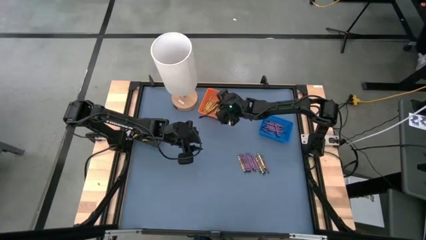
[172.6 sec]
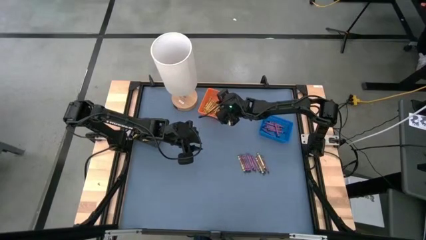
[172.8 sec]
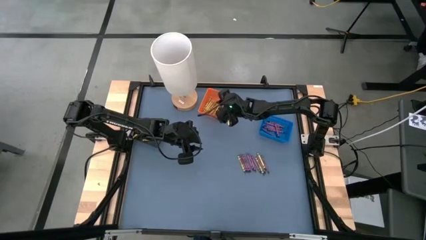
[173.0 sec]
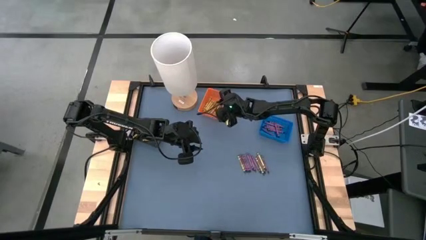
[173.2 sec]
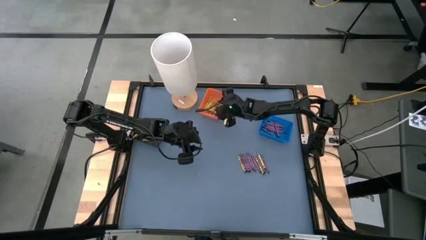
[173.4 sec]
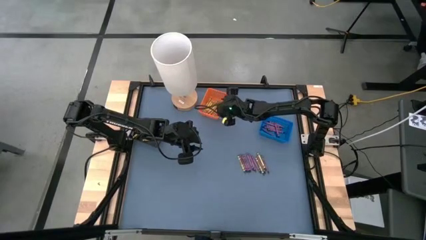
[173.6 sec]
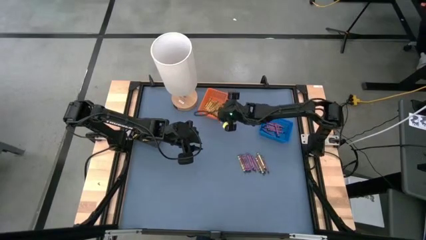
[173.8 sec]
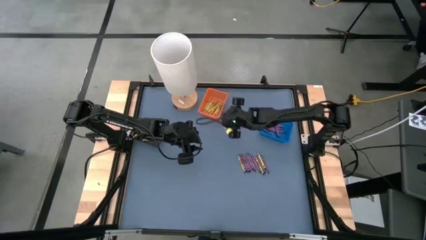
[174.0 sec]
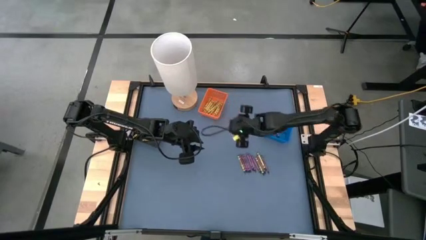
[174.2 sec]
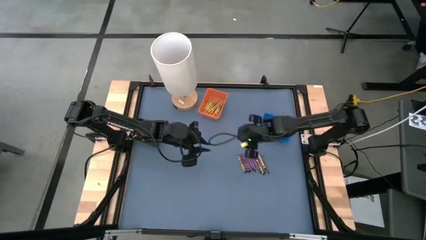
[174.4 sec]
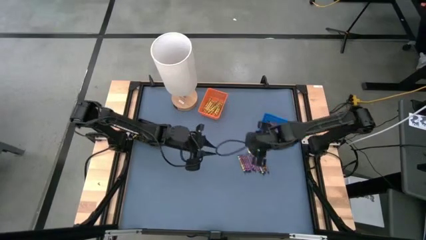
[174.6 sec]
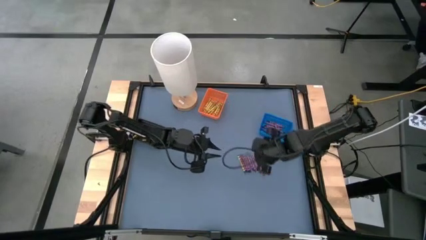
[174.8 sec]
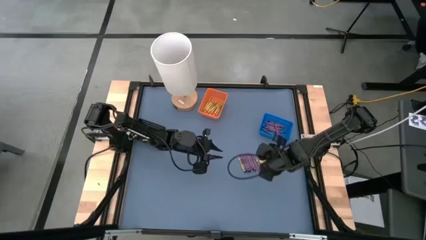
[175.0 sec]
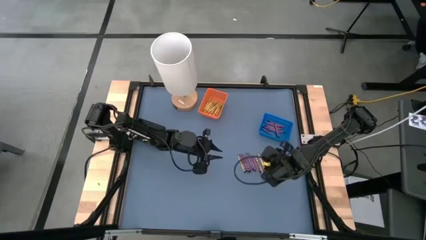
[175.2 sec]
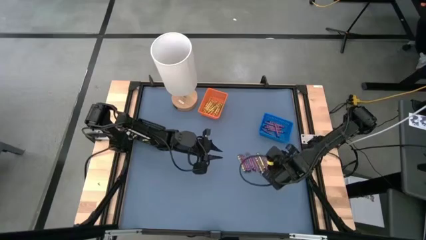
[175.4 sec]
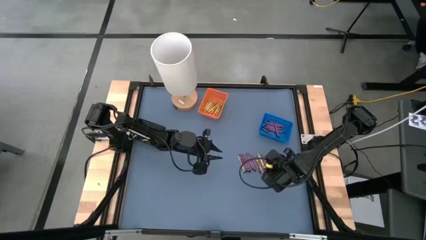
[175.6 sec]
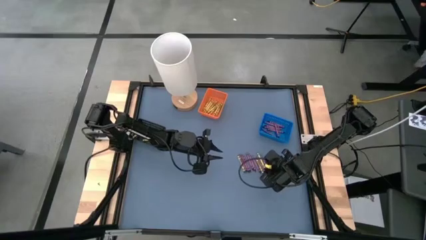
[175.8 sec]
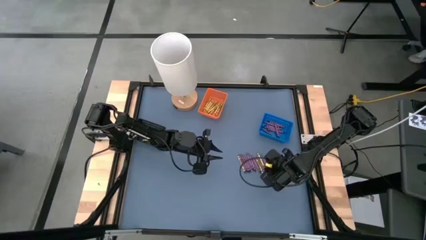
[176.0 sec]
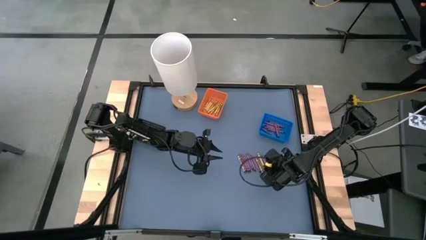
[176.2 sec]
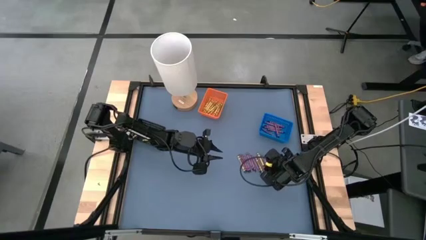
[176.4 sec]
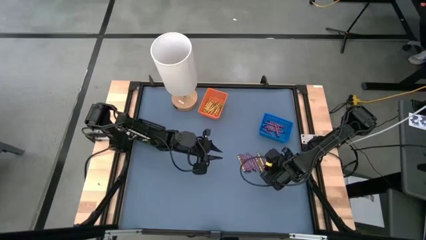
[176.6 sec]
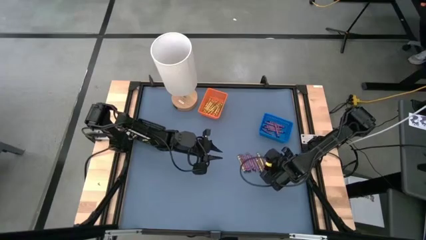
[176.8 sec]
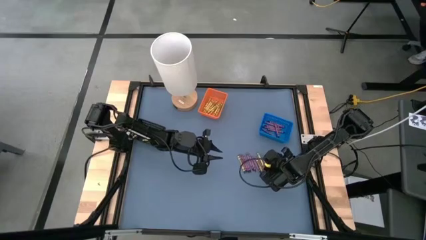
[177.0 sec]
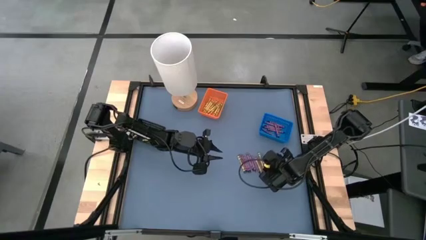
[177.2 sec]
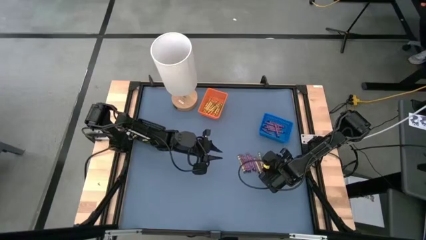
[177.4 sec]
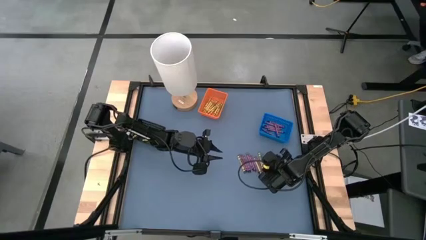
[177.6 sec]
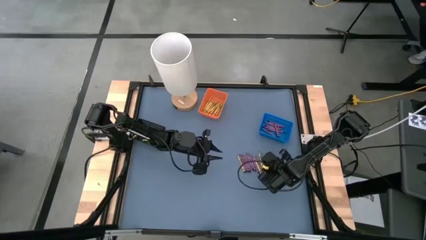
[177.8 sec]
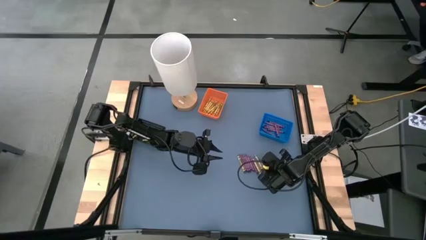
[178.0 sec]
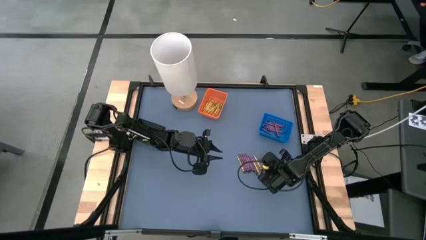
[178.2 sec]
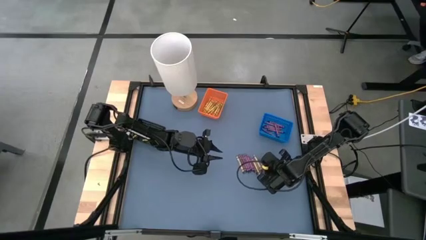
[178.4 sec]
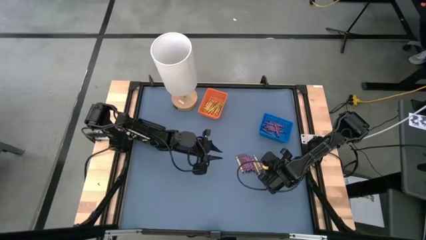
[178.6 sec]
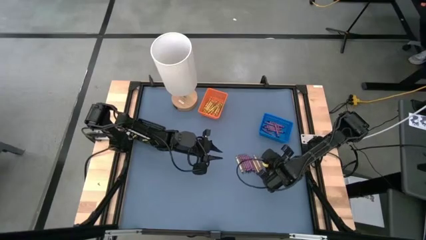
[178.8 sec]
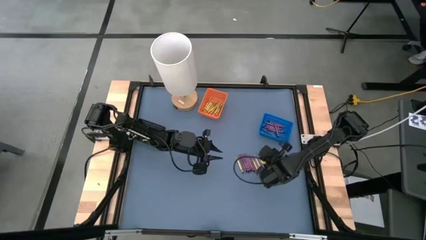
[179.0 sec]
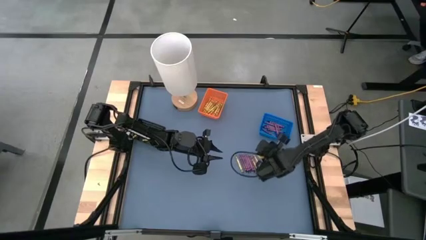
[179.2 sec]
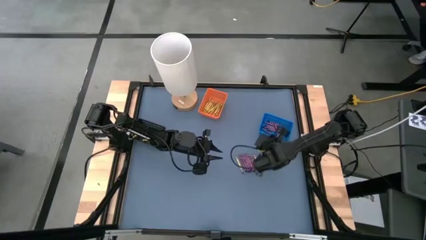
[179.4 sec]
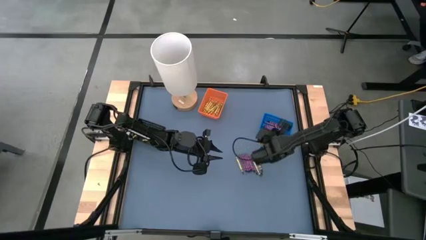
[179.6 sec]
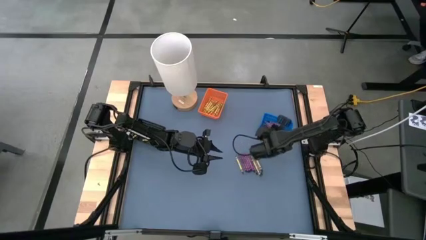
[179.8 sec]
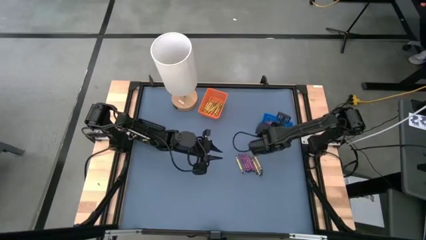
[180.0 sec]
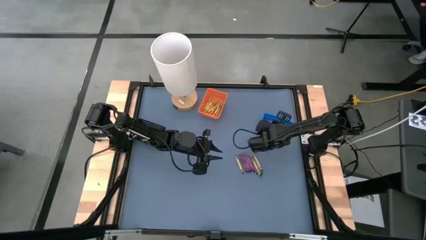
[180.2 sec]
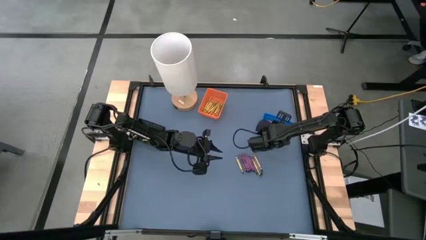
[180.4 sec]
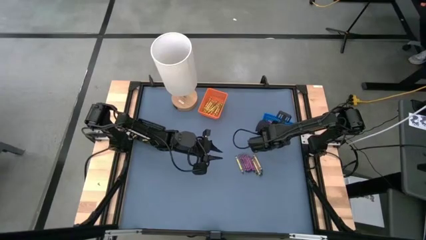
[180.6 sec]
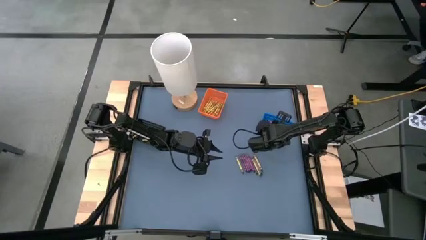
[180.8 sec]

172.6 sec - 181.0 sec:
Task: Sort crayons
Put the violet crayon into the blue basket

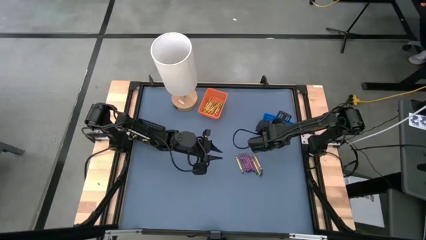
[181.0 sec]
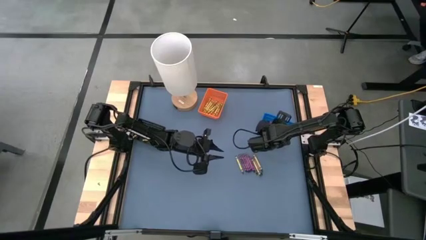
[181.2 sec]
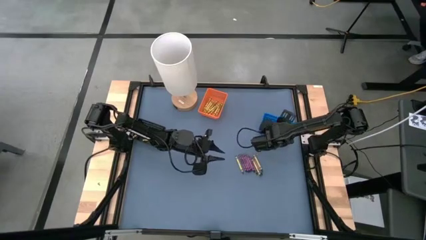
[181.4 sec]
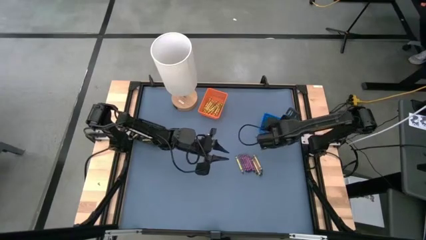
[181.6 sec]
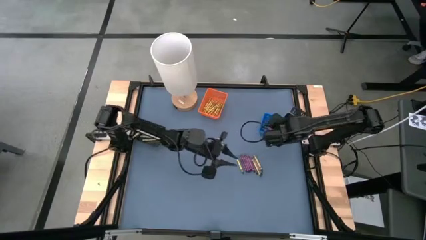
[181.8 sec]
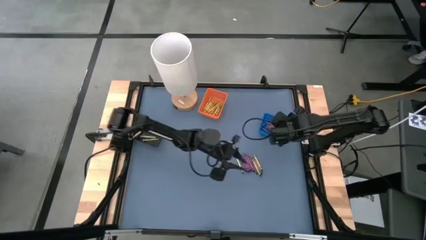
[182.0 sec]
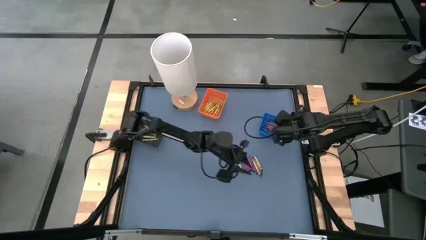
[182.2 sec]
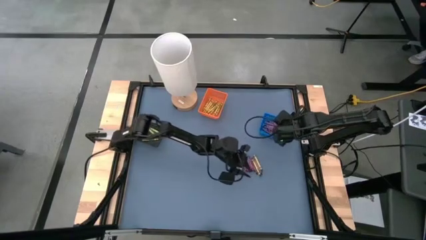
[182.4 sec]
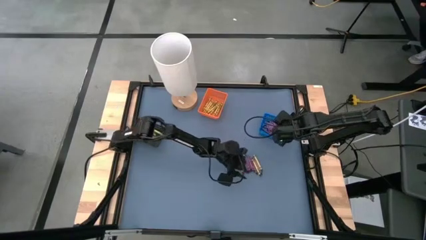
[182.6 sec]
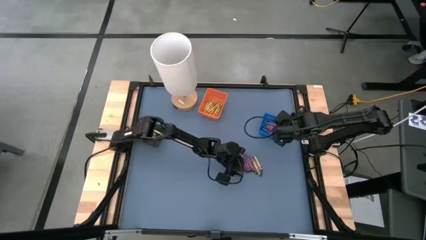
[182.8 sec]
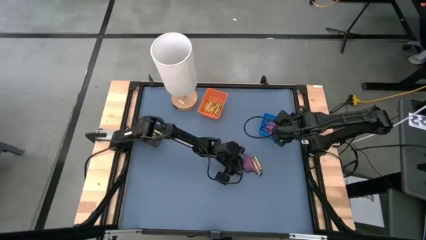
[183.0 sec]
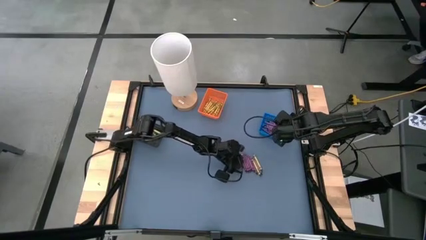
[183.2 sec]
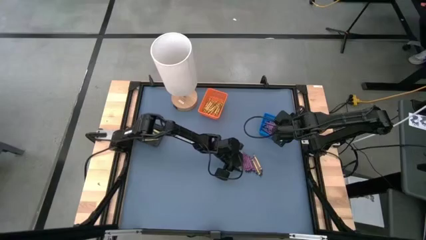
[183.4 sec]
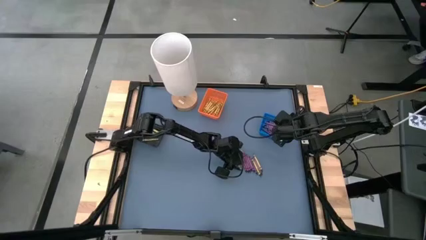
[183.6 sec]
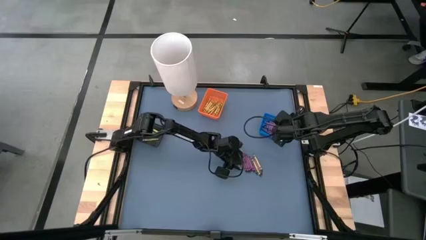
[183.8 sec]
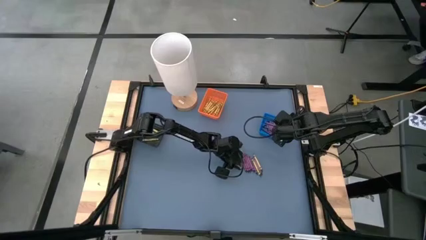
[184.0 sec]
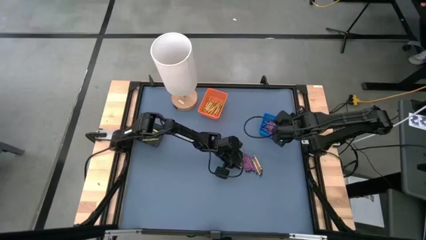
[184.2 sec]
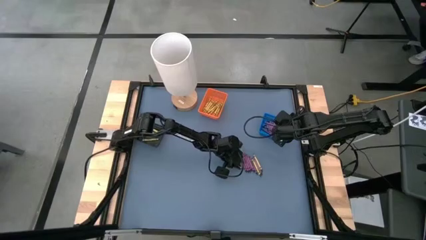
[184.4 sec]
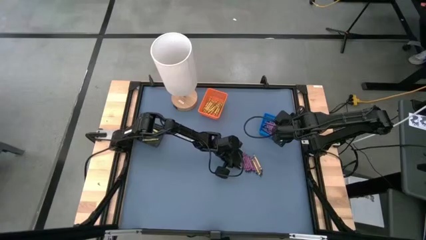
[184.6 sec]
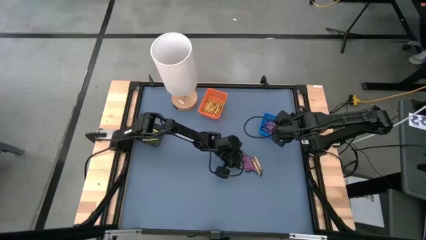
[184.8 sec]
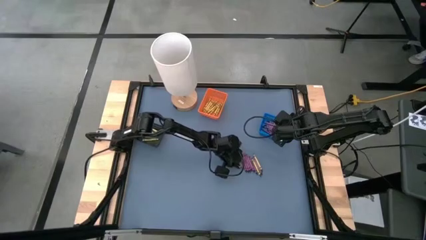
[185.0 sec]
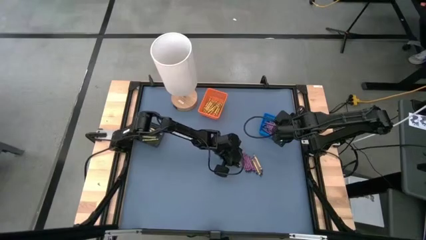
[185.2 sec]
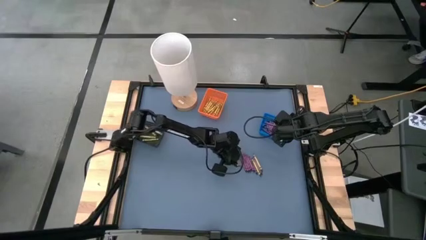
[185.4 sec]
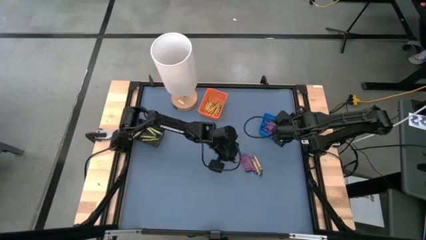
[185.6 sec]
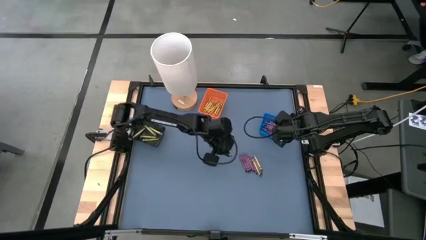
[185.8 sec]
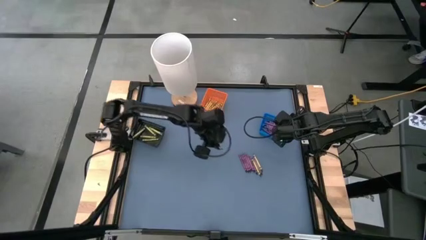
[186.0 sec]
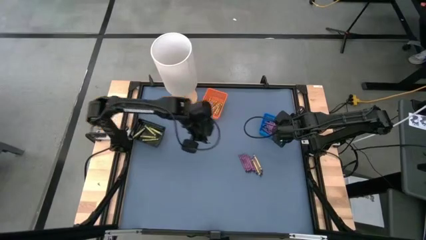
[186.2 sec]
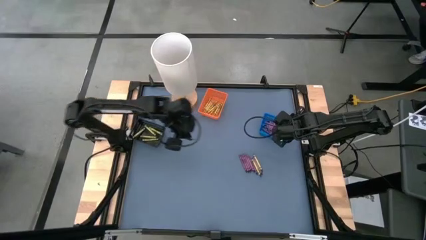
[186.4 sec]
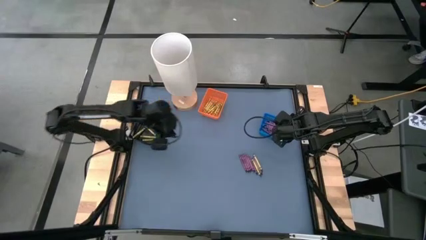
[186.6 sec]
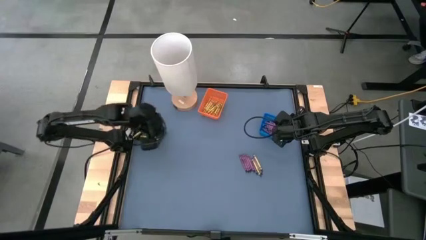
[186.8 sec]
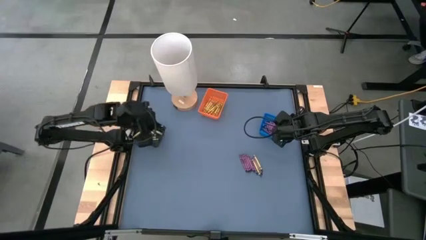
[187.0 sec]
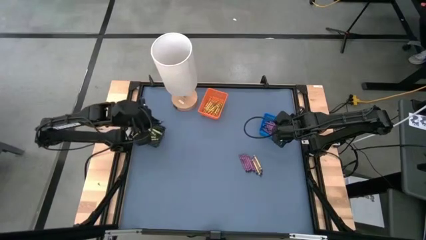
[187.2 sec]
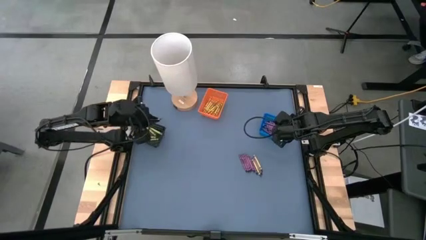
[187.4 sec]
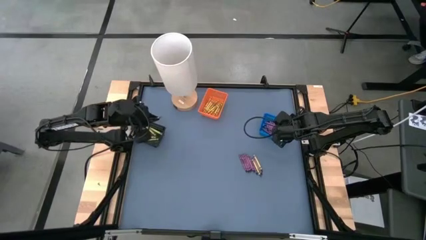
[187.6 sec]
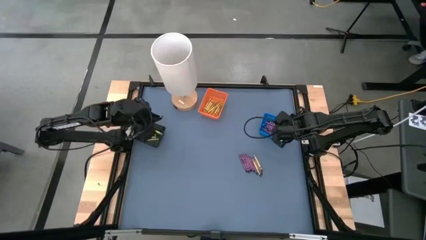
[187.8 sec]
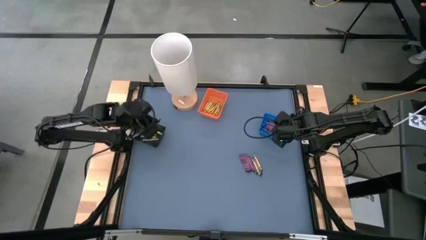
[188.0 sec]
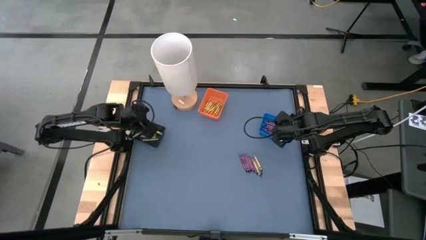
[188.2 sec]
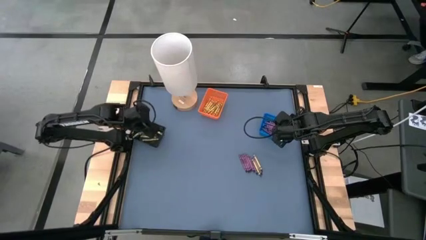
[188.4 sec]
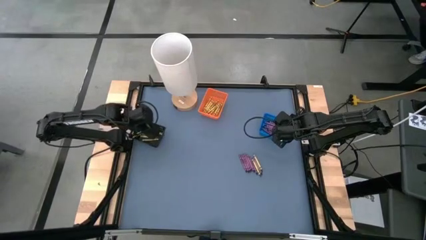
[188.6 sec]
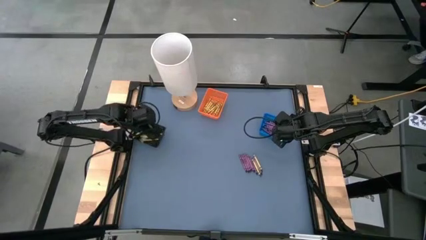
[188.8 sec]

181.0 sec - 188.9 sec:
Put the green crayon into the black basket
